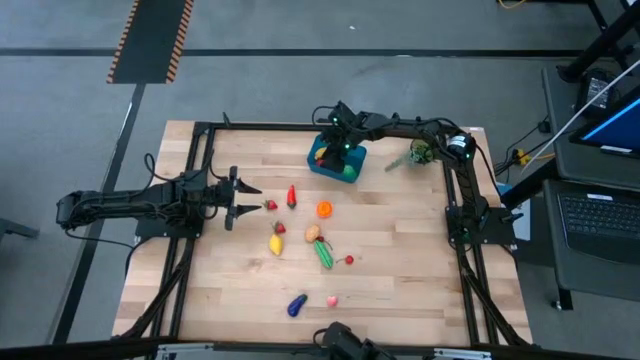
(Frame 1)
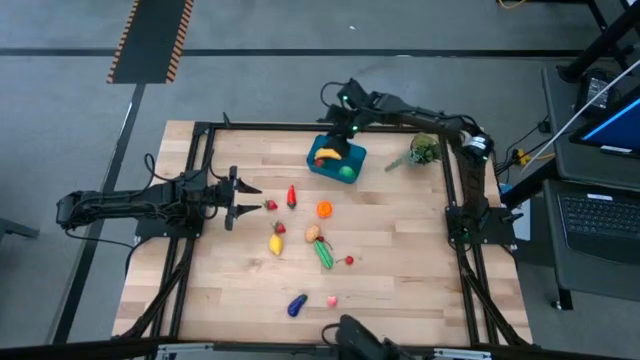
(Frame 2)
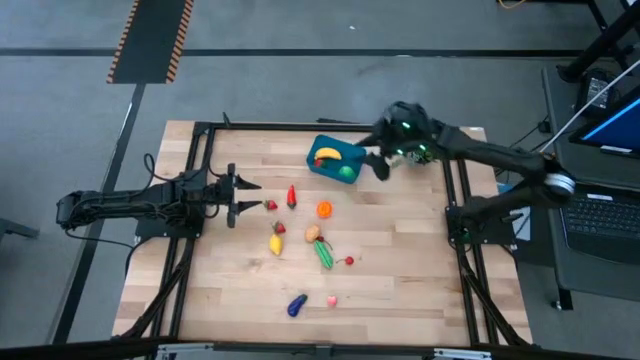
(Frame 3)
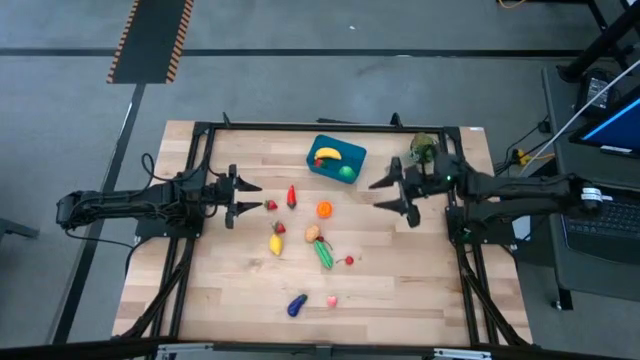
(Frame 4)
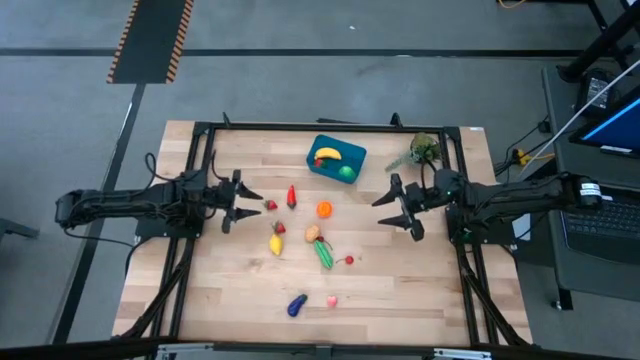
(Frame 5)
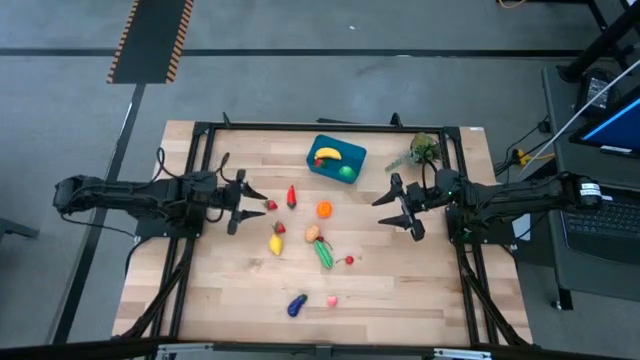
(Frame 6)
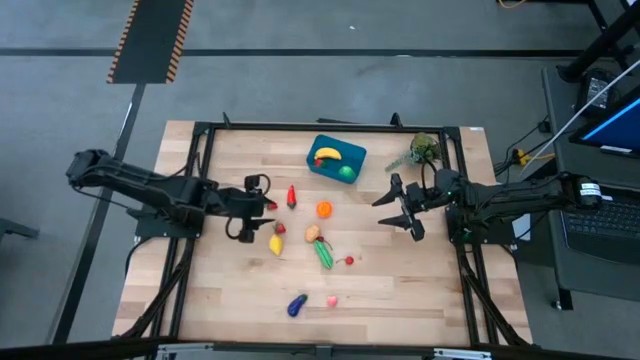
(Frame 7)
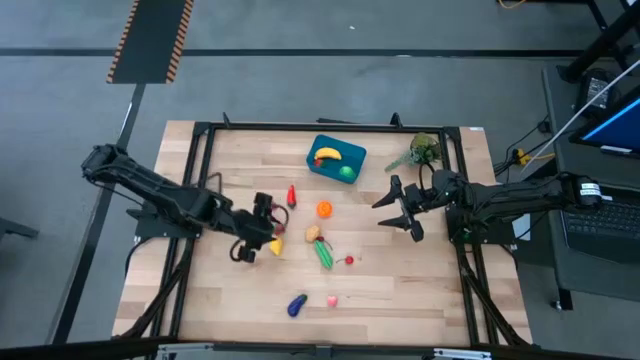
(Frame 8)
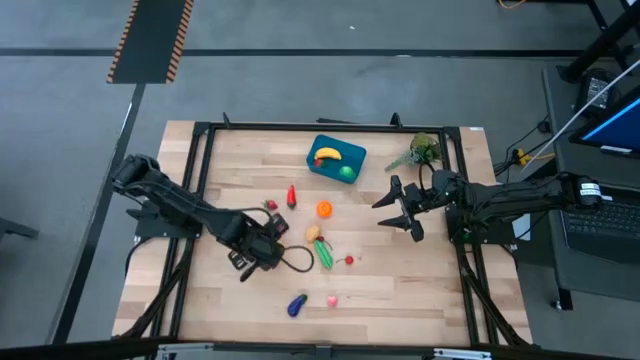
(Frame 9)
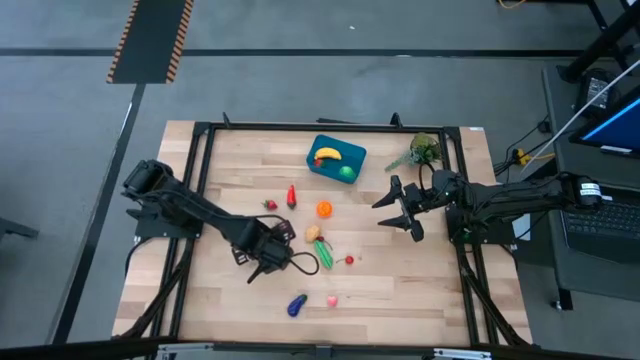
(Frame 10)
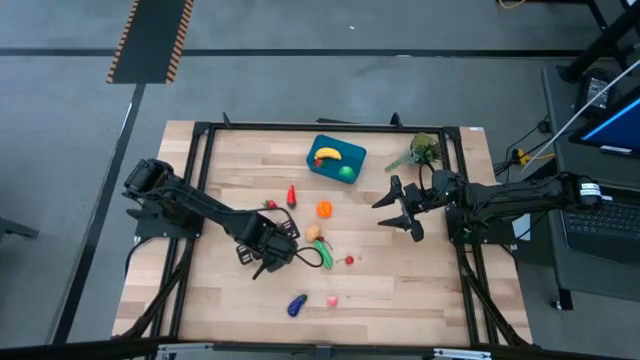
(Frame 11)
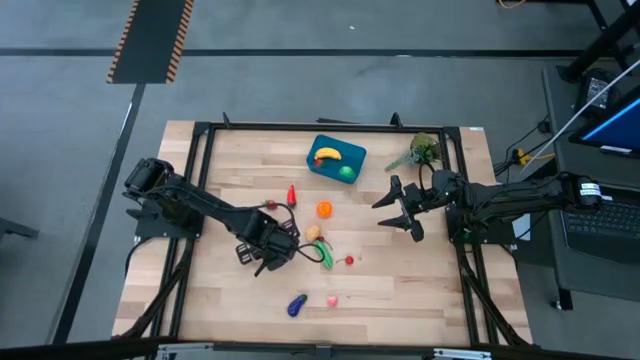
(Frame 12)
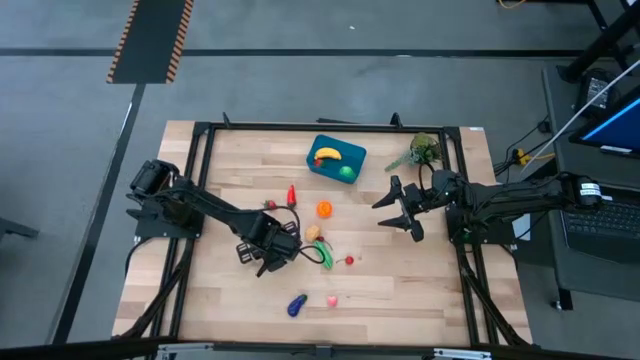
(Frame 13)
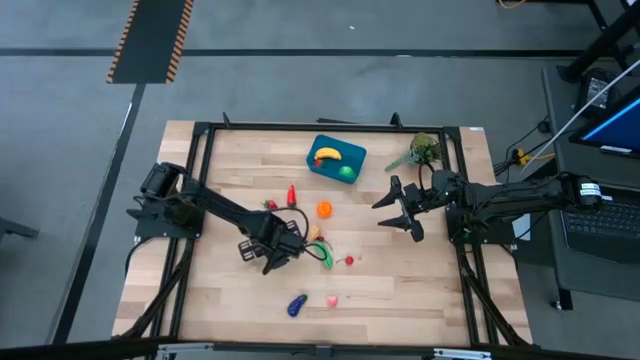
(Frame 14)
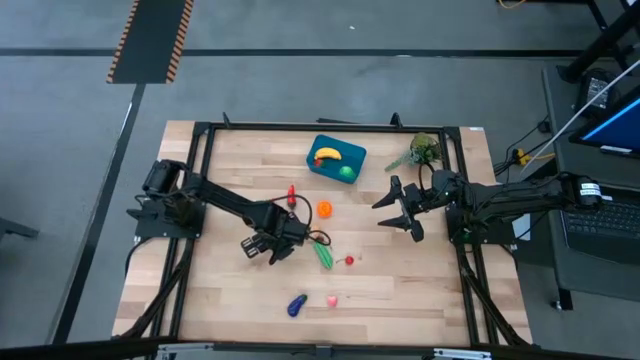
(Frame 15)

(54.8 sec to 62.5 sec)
Task: Pick and placing Produce into tupperware
Put the yellow lemon into the blue bin
